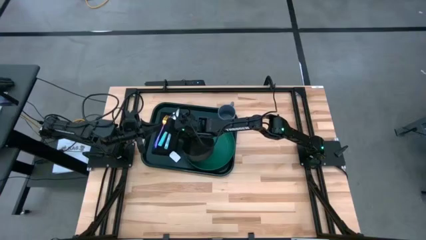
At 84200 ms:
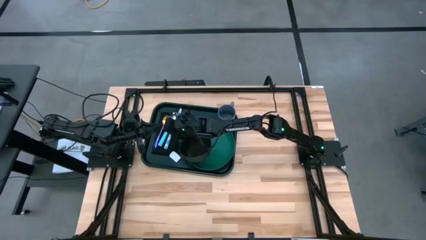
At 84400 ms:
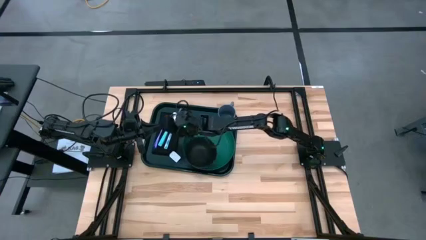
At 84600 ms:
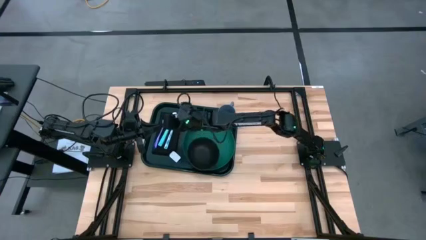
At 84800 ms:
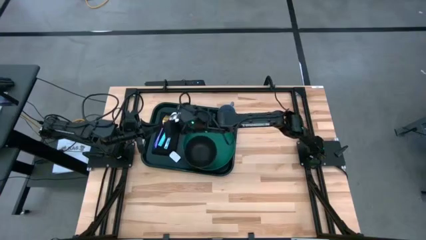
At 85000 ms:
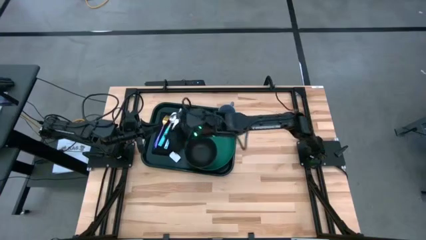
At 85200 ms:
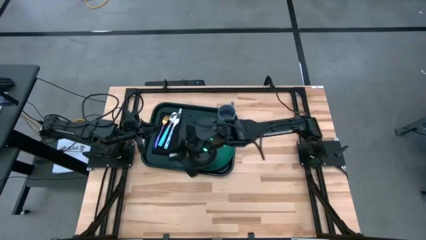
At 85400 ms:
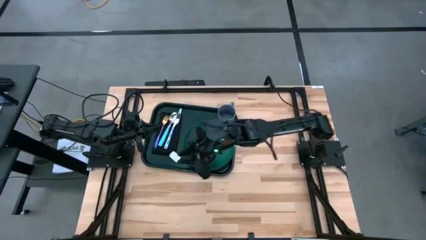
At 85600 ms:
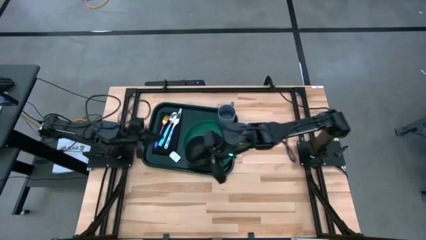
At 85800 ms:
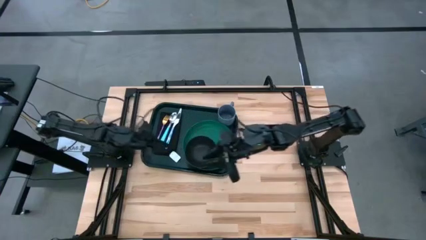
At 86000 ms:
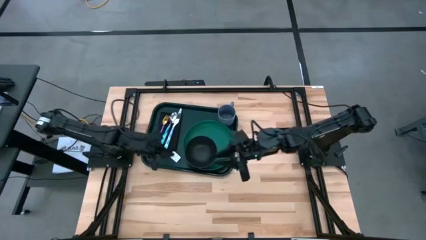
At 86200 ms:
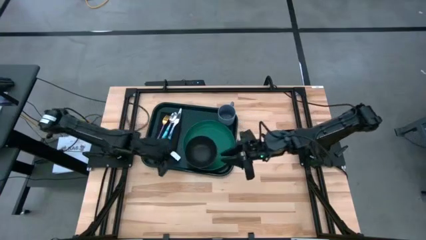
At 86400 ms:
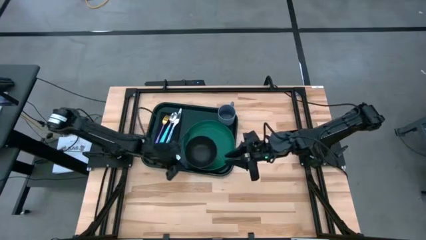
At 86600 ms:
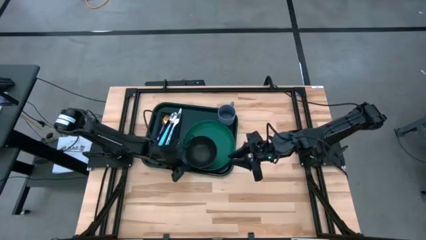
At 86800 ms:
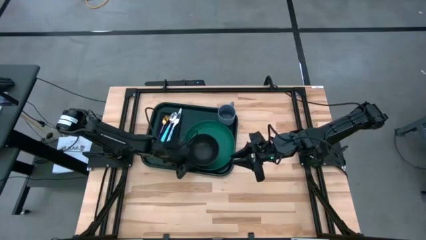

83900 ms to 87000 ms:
Task: Set up tray
Adjust the black bowl on the green plate

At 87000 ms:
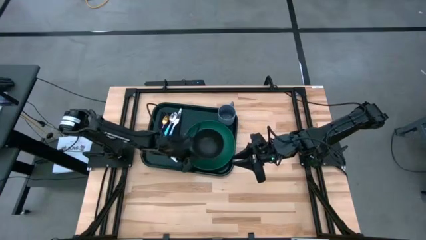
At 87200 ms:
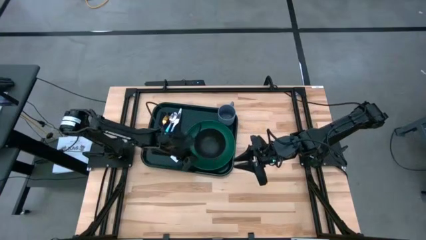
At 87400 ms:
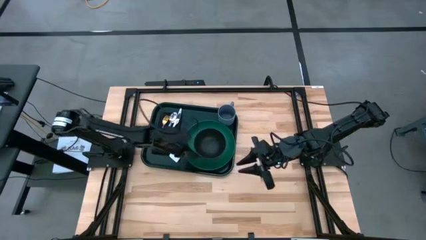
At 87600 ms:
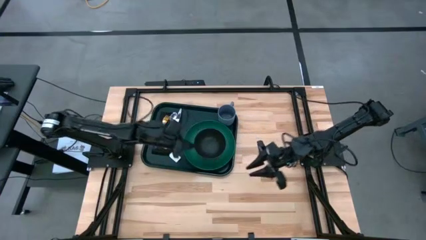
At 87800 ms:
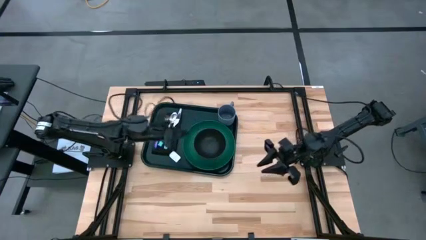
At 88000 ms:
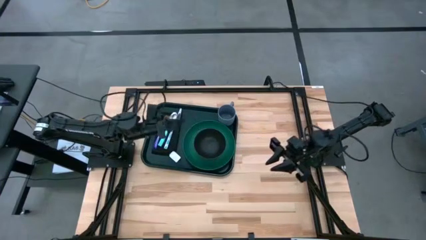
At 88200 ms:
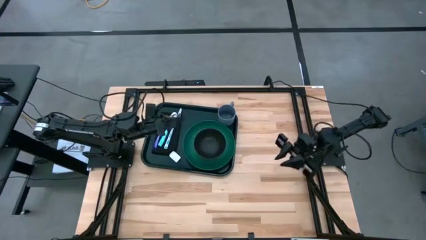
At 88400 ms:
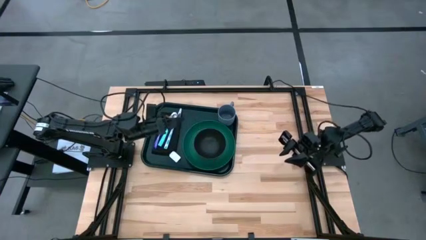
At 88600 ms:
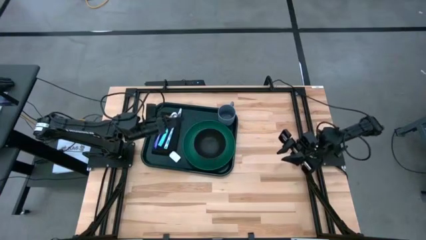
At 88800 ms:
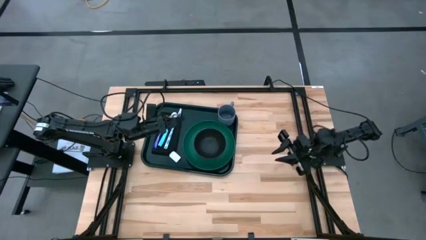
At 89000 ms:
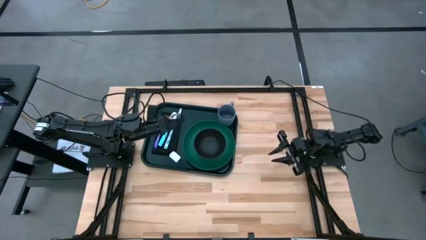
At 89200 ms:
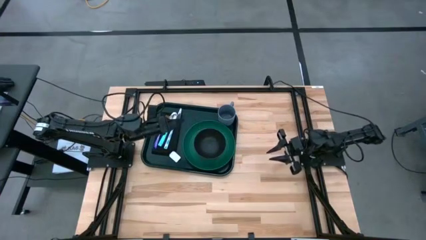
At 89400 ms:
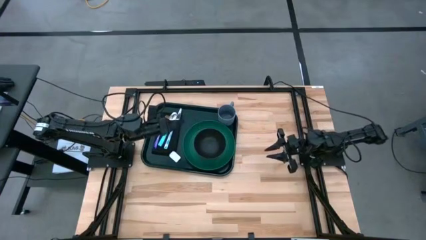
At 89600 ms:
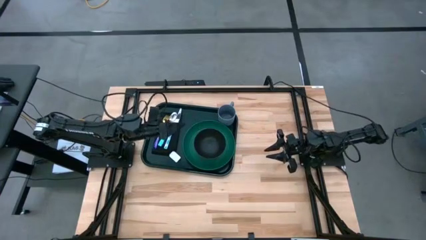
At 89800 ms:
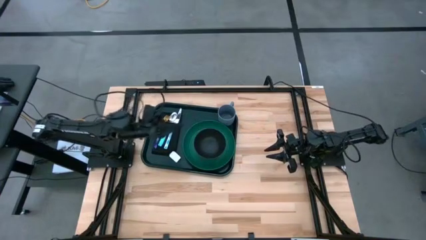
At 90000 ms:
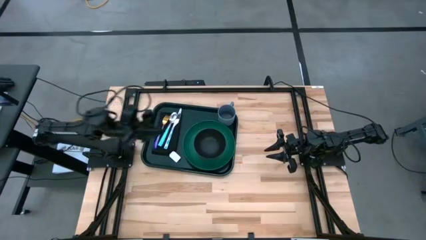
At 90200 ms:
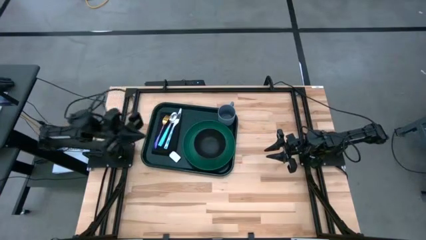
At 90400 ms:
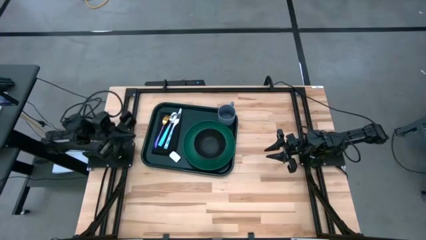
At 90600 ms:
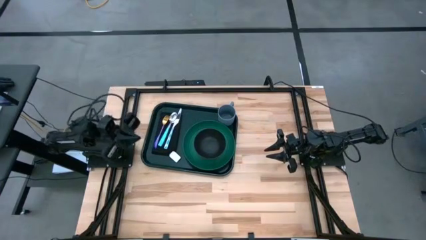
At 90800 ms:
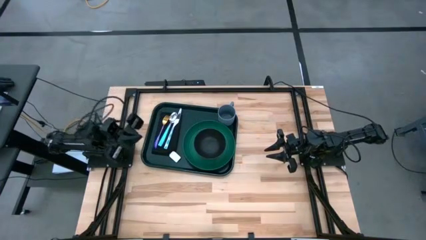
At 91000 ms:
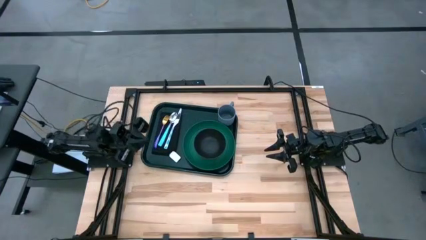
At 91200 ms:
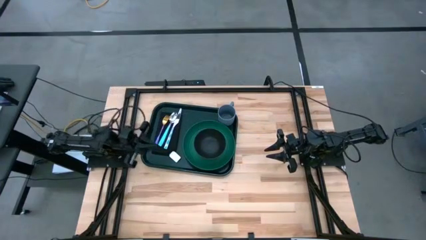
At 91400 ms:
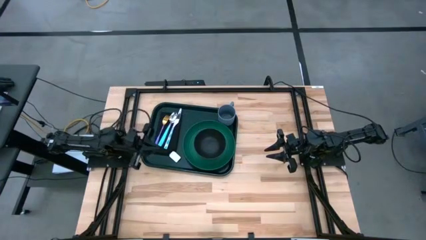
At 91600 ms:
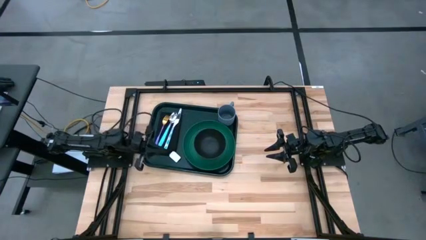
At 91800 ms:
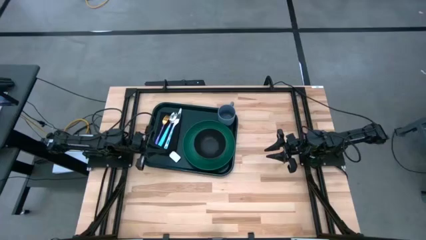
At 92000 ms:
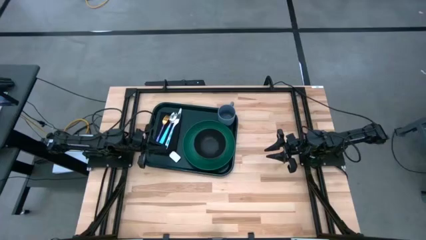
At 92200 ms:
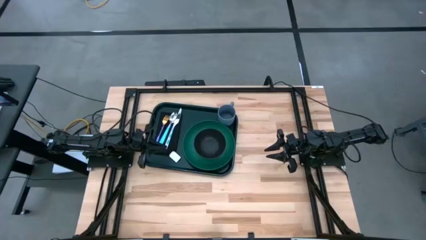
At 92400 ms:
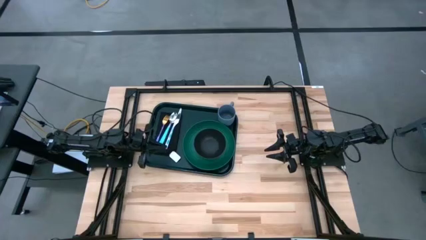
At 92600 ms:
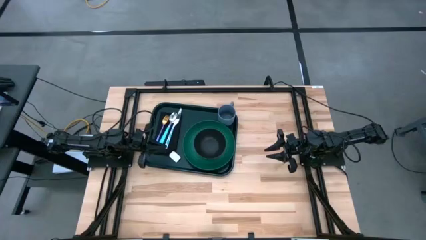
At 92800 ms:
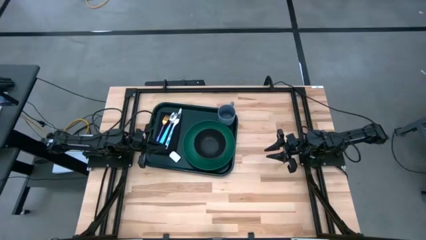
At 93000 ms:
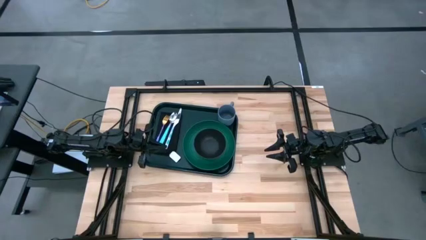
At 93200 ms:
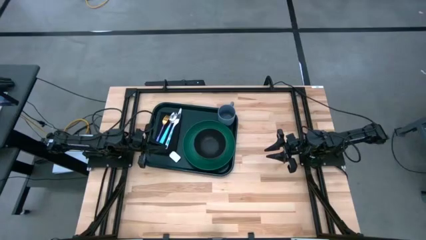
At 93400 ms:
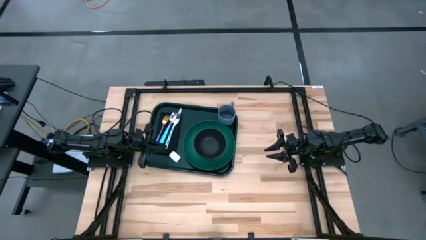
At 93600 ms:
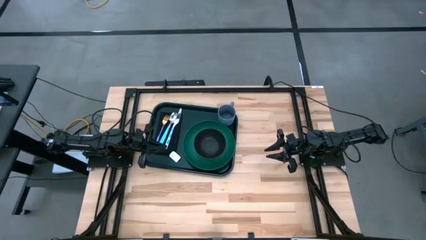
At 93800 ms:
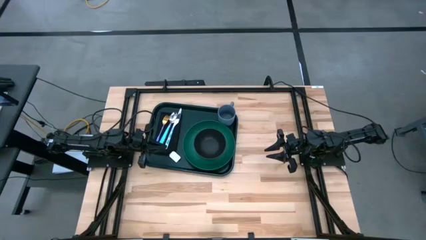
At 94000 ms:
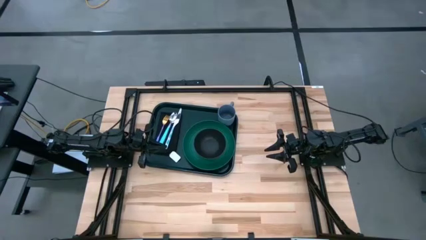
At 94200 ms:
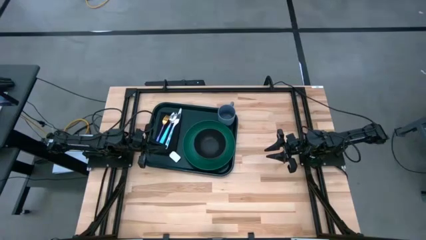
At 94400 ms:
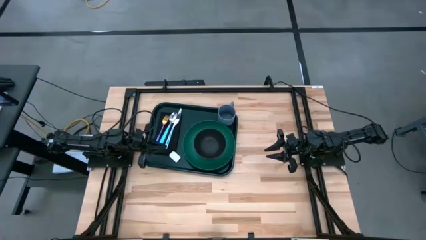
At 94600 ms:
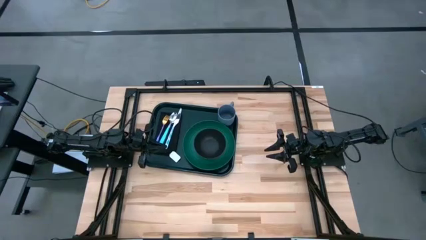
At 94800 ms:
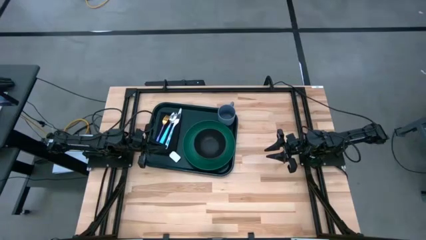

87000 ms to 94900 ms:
Return to Home Position

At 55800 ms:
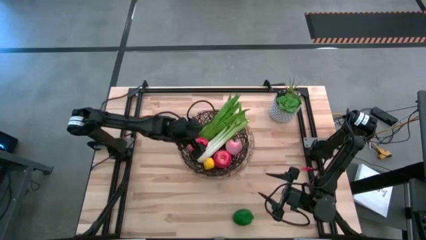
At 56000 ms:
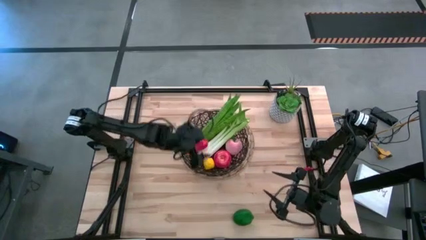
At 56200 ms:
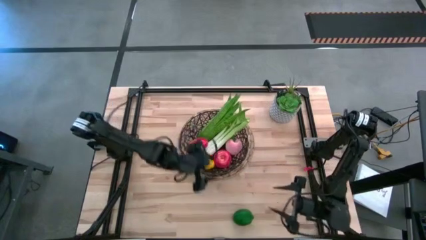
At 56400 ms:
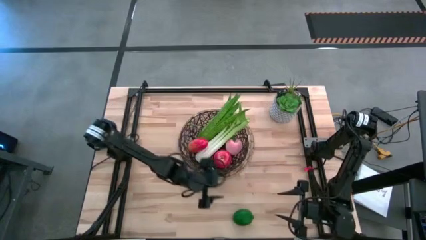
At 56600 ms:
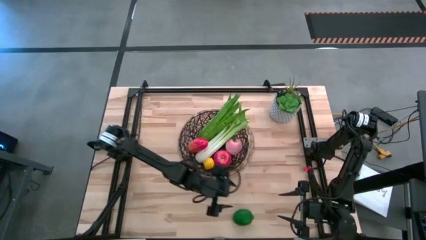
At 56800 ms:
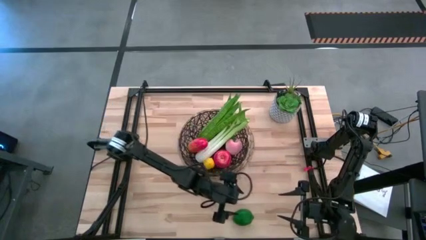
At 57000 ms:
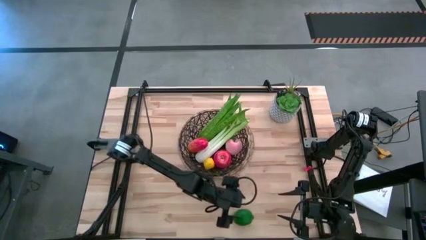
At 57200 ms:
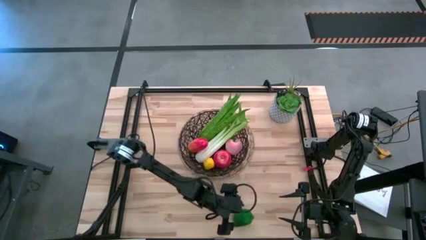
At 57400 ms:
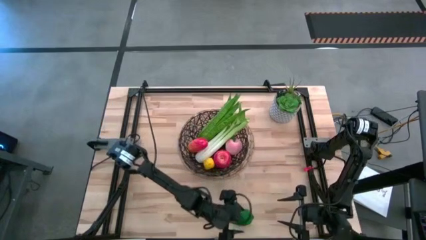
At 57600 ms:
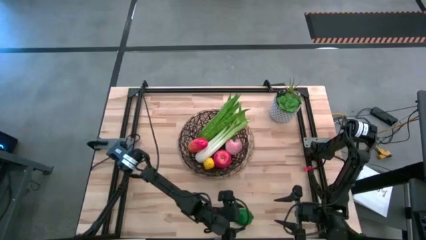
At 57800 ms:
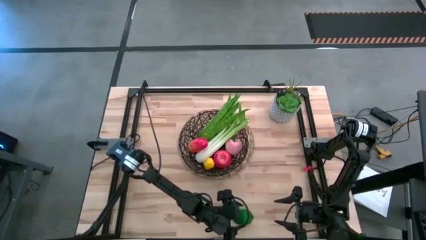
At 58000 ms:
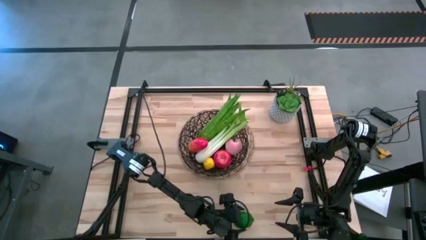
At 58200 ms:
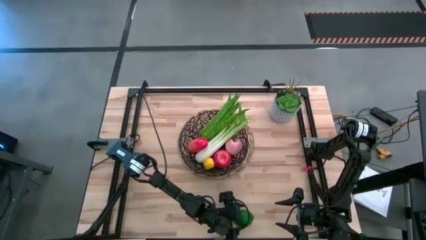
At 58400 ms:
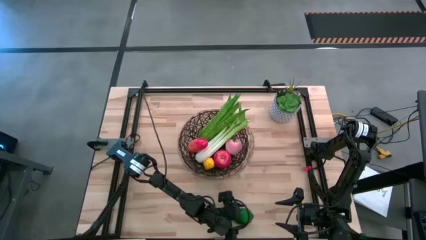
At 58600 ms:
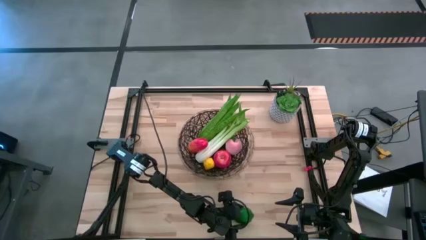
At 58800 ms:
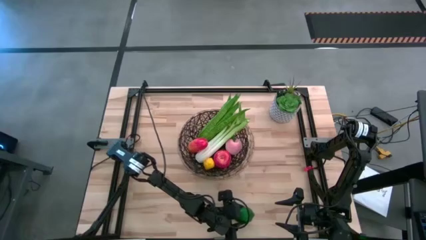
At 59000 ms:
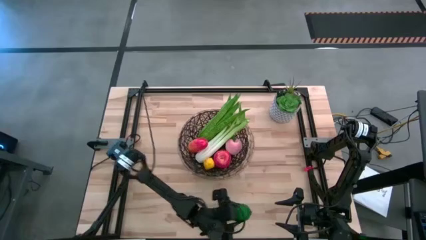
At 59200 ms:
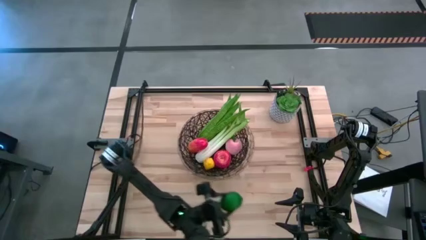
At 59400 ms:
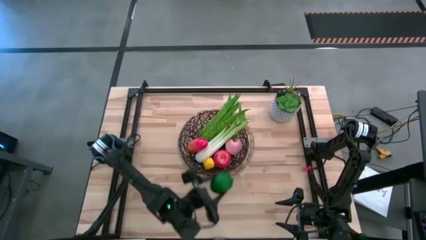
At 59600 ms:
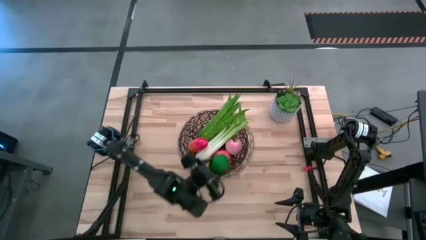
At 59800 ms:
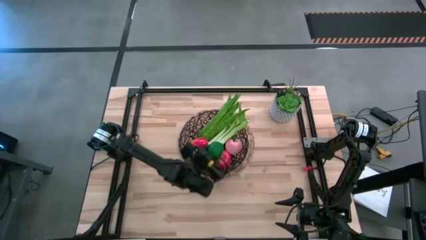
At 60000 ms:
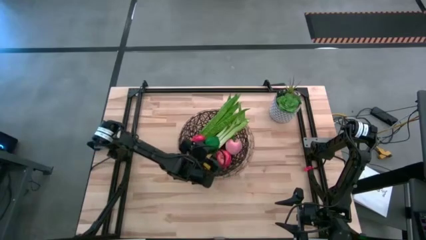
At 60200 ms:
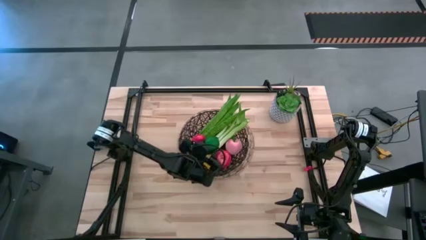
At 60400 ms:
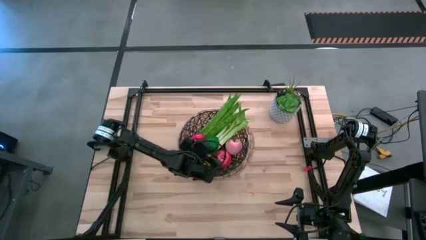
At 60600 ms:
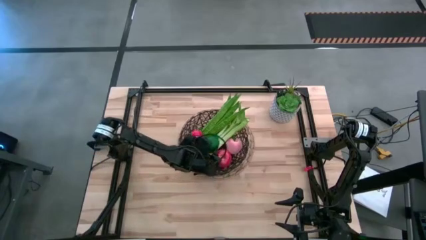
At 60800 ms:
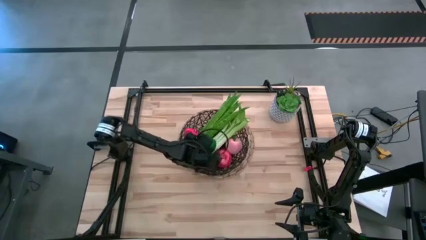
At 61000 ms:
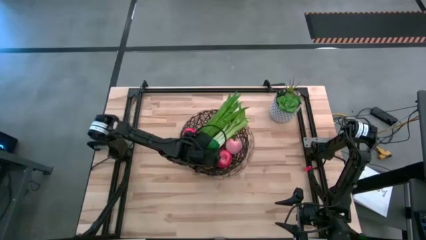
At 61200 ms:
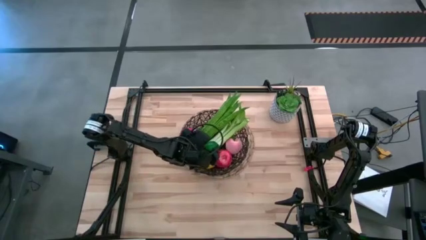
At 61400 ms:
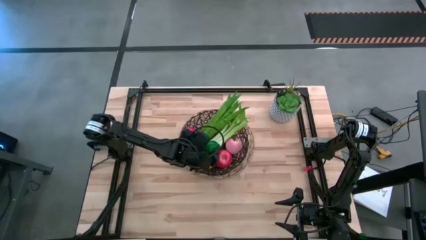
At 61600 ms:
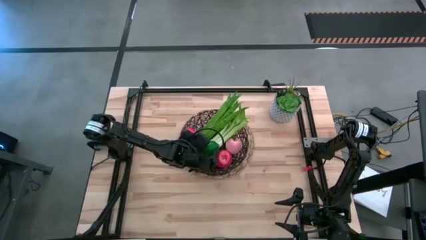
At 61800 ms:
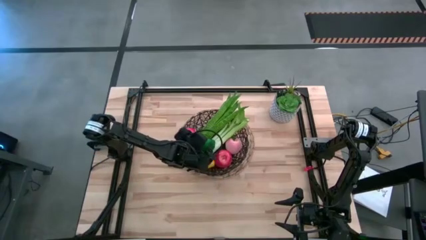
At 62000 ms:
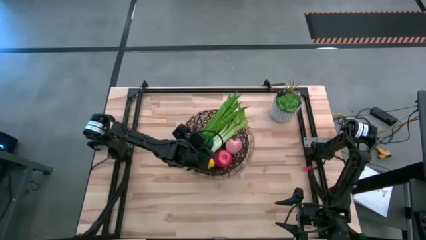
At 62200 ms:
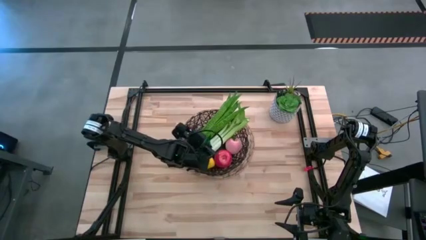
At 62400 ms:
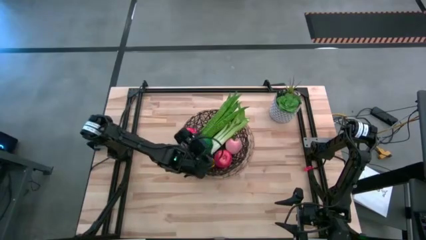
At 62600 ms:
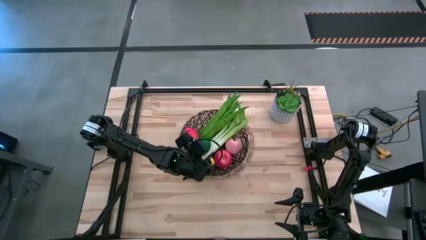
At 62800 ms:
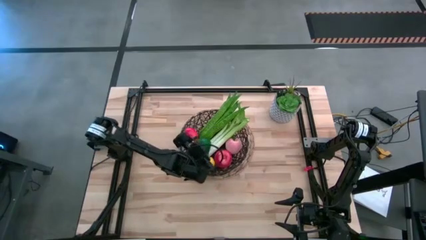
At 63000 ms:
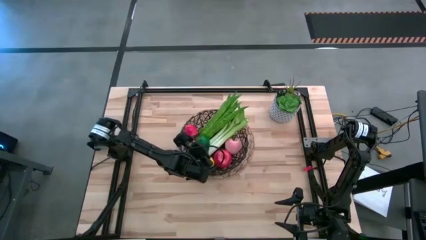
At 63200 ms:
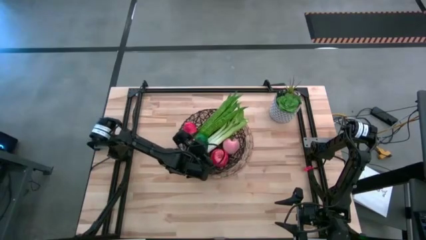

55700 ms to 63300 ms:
Task: Build produce basket
Put the green lime into the black mesh basket
